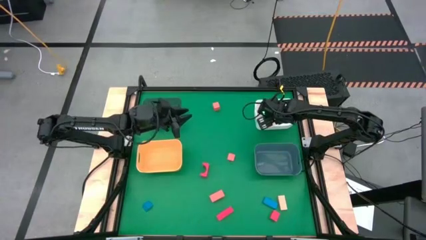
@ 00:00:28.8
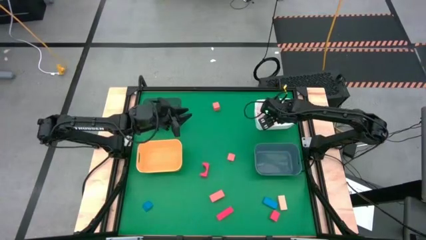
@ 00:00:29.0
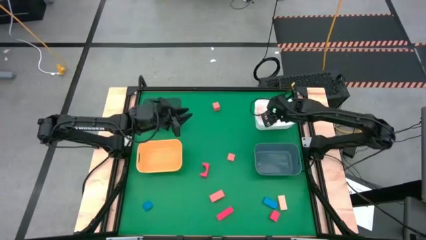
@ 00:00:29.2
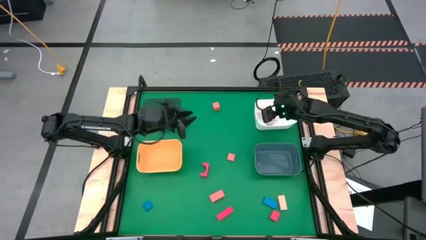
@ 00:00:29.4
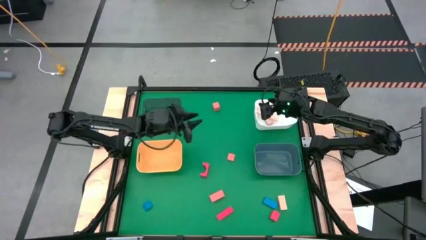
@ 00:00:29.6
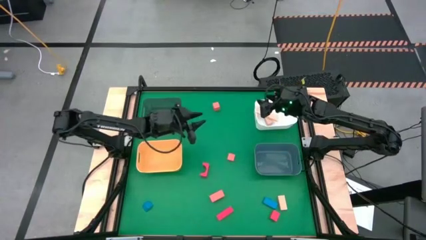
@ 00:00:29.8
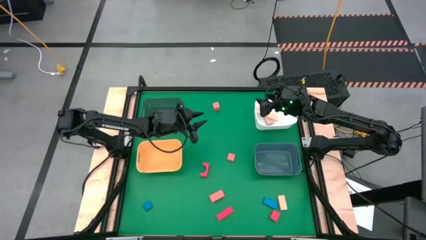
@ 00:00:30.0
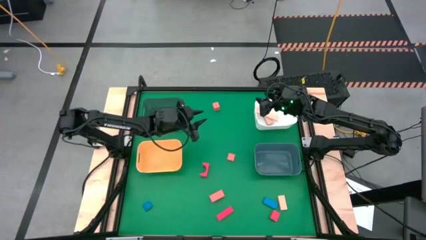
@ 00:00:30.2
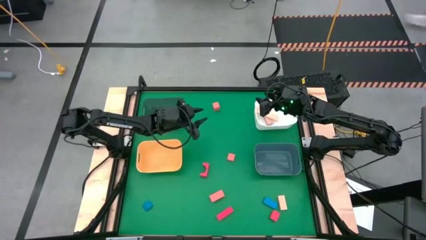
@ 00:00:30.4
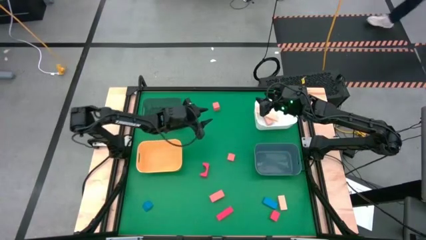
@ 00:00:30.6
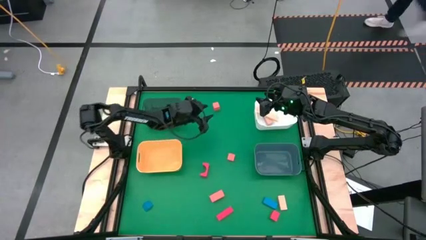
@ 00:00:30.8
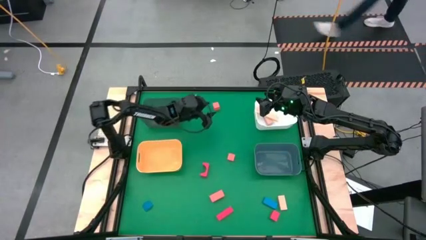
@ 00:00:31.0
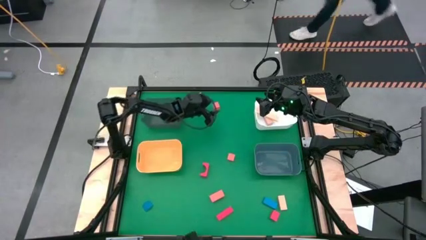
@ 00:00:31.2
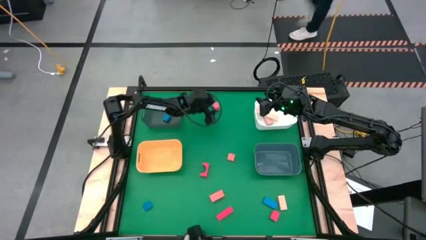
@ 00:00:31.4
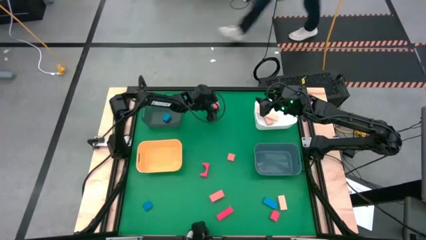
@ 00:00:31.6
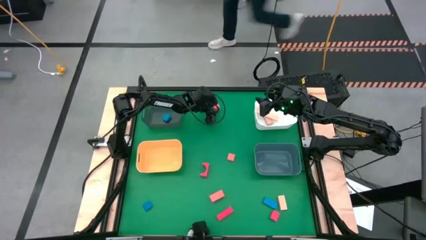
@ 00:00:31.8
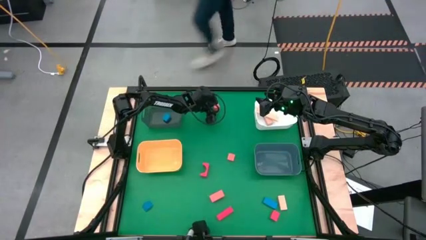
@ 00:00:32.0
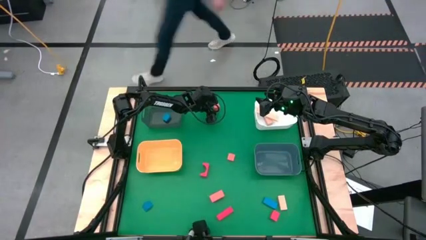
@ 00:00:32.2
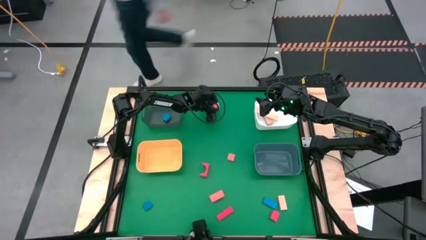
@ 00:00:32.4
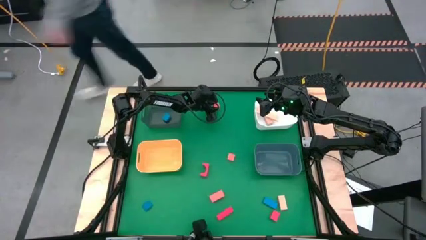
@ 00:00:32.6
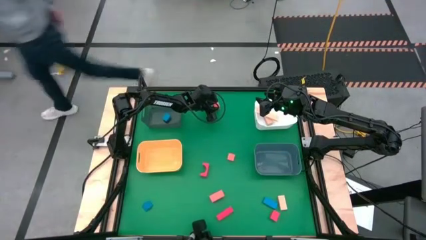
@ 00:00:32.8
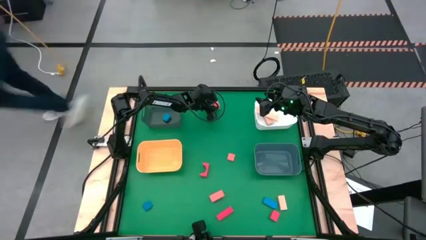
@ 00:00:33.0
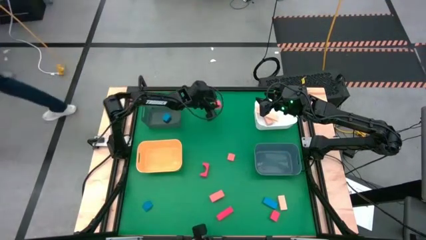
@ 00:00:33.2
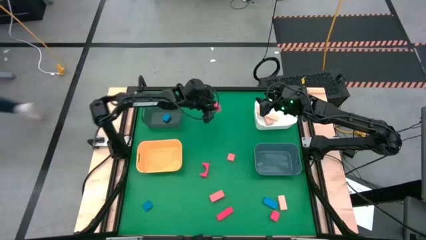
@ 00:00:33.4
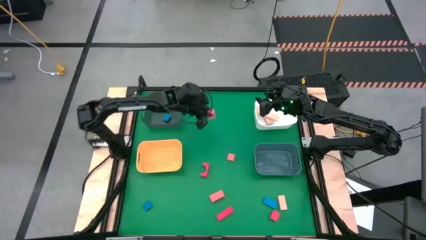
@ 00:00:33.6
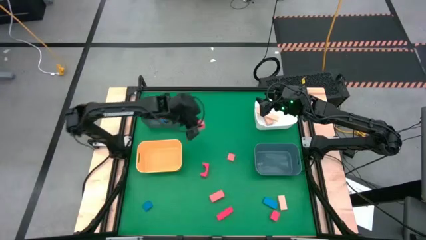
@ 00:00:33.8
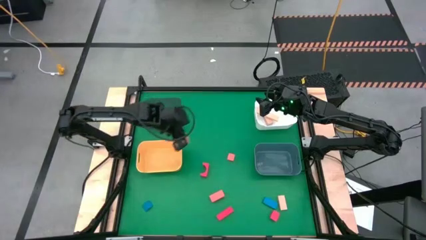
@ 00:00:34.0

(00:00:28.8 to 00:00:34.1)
Task: Sort & place blocks by color
Put the top right orange block into the yellow bin

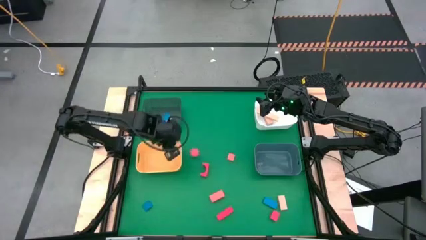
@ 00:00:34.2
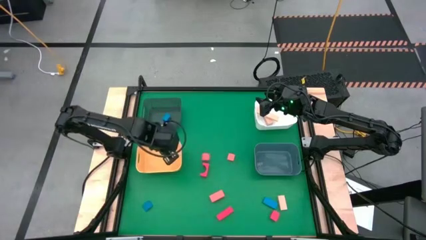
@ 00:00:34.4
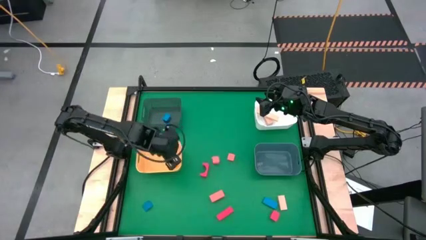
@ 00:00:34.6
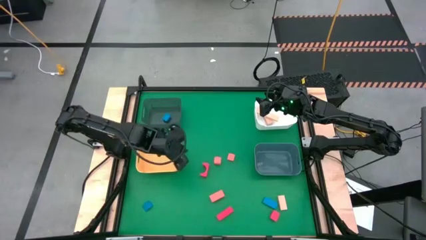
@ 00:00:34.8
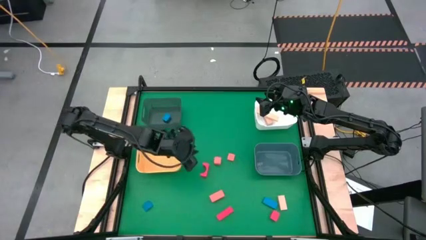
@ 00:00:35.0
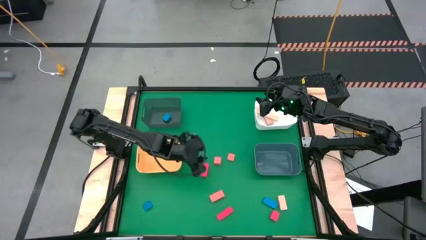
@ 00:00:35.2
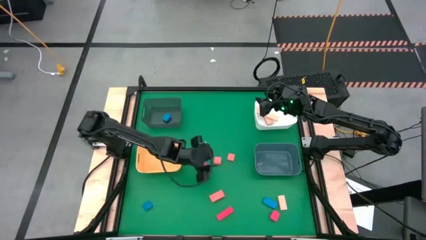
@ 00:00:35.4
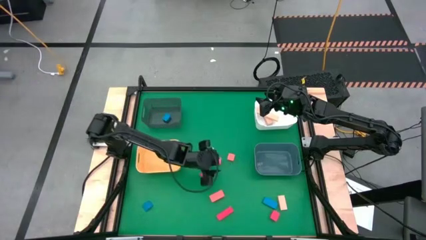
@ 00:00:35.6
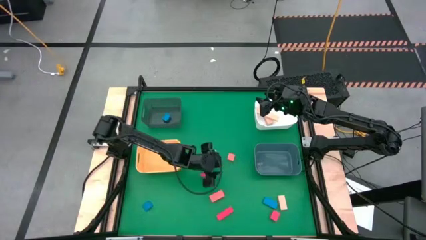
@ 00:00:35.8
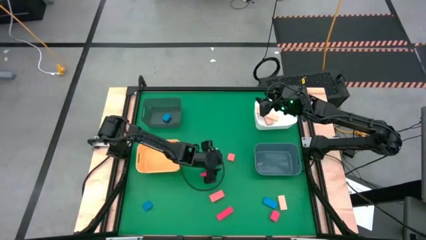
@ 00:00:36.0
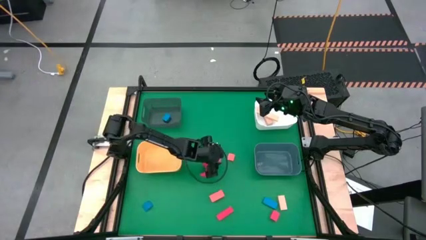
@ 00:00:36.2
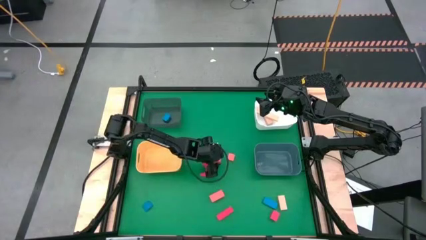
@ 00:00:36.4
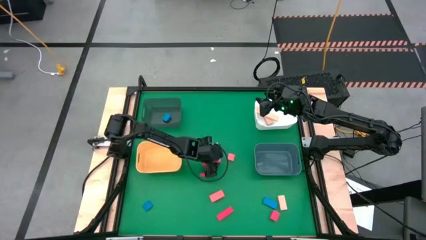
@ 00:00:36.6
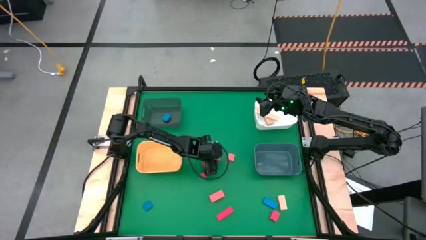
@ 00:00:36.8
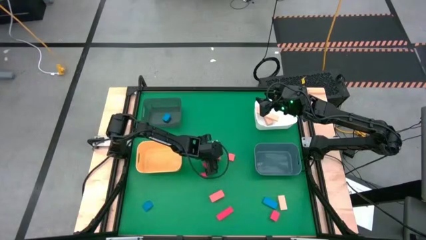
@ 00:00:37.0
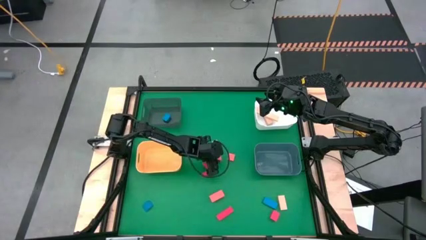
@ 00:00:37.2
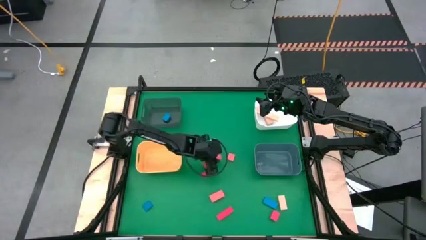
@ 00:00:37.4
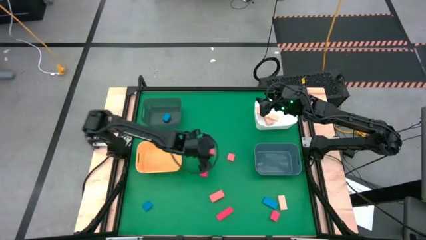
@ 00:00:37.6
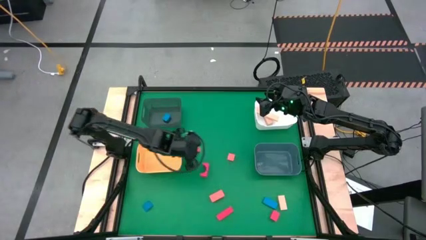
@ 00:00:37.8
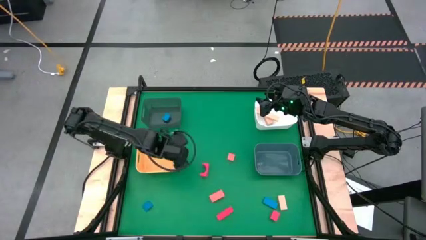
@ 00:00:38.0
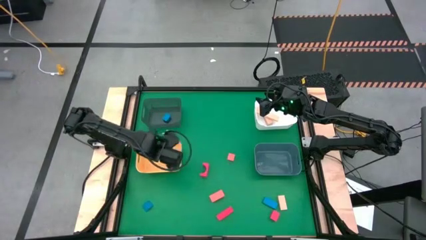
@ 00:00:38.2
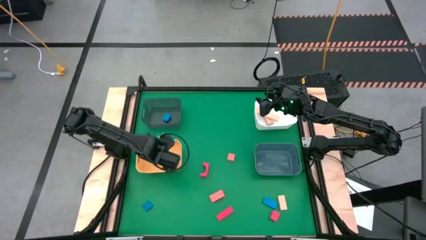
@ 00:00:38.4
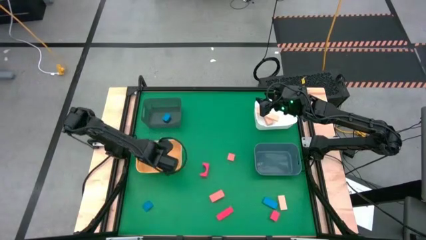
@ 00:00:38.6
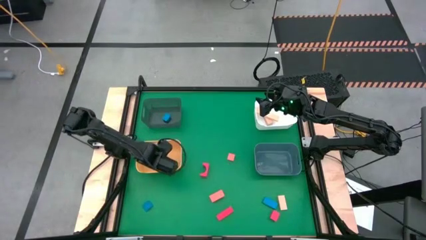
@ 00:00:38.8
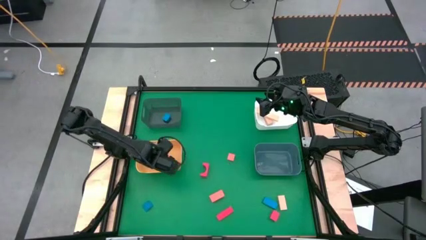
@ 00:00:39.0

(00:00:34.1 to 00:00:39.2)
Put the top right orange block into the yellow bin

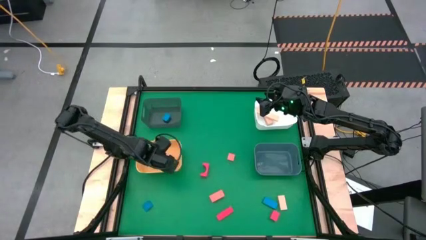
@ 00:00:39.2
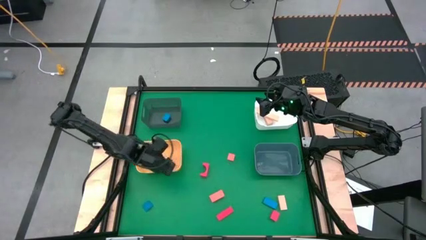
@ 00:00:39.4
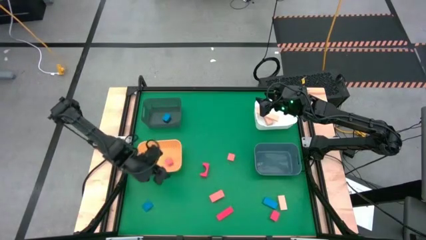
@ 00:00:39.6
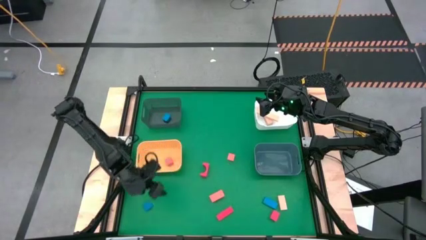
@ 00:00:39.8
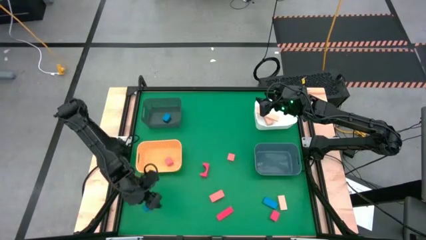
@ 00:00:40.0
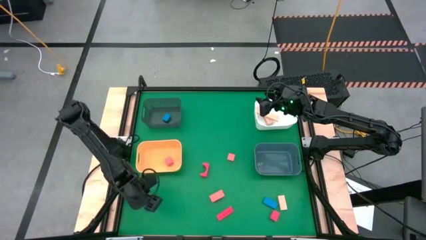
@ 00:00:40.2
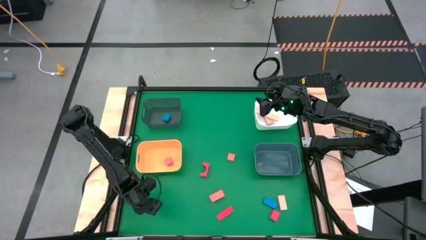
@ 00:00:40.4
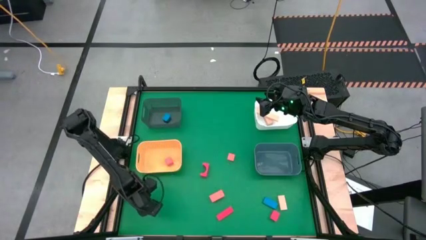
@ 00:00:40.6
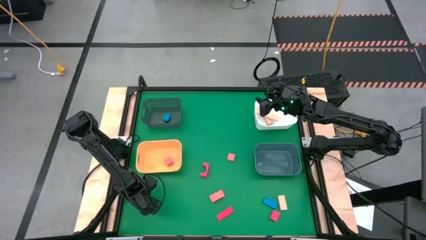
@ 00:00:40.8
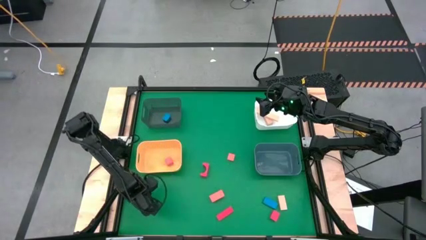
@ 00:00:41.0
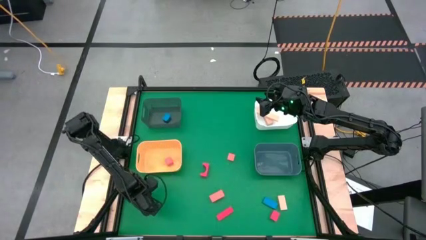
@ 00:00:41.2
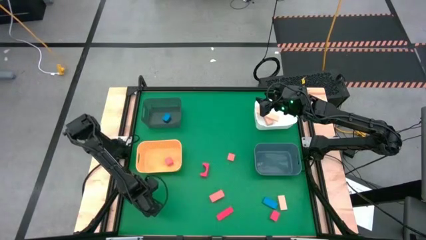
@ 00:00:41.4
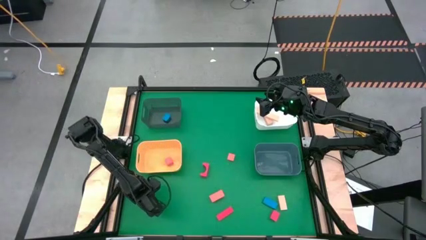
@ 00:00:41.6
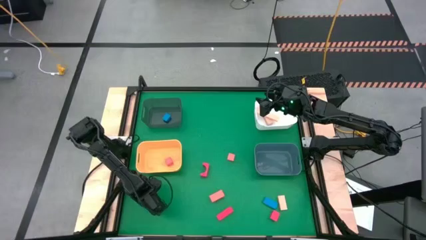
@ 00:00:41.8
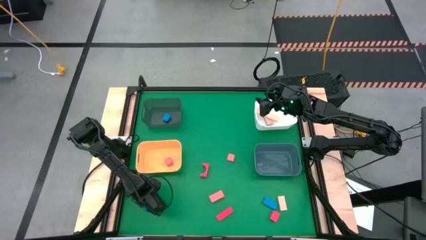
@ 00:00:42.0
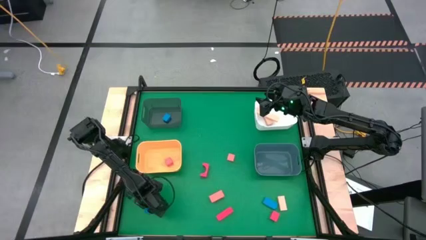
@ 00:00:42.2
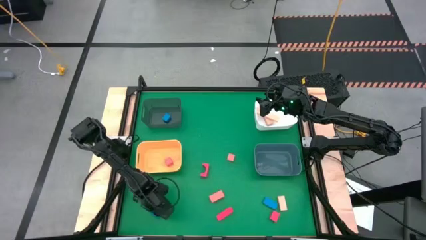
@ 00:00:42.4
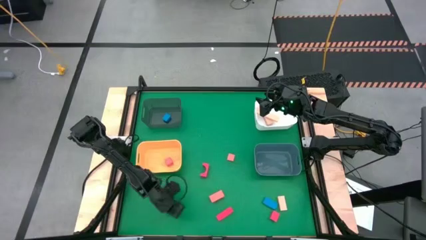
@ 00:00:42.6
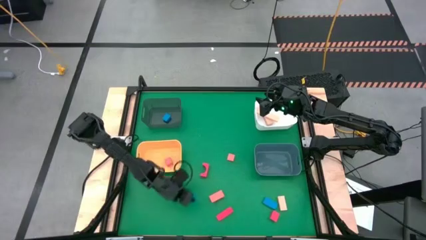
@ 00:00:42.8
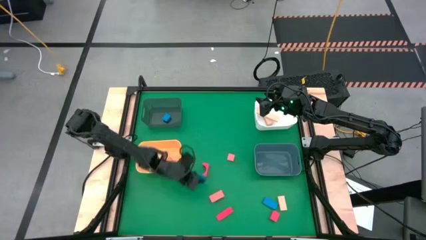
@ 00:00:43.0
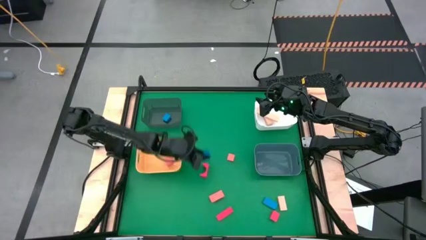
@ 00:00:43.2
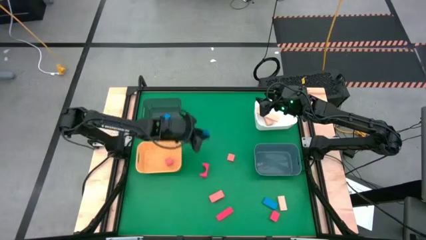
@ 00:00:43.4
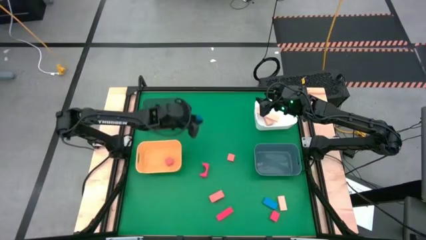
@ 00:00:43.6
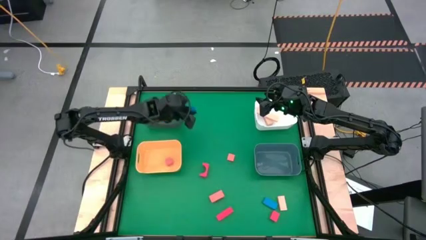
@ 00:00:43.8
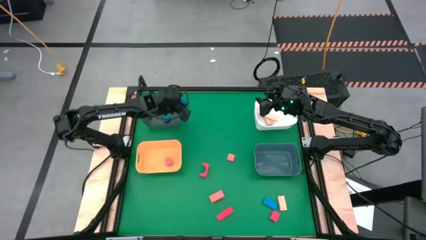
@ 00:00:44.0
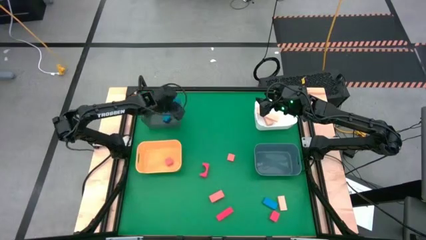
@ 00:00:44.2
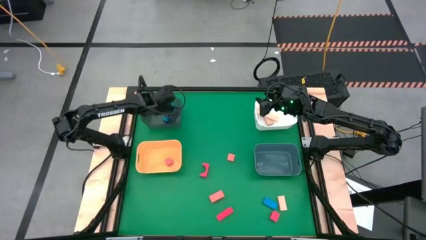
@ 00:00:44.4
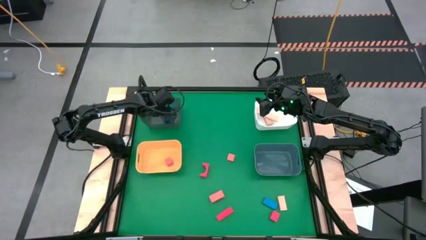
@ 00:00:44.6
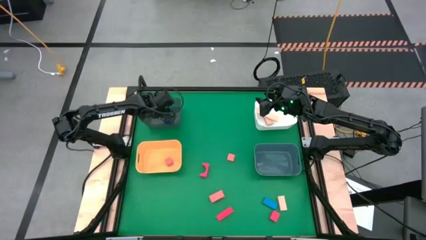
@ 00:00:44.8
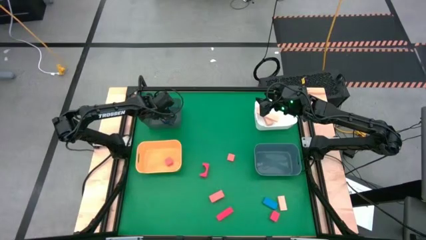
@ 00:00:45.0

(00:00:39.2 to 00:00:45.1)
Put the left blue block into the black bin
